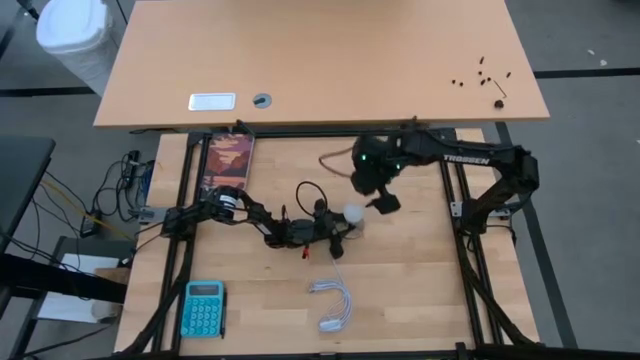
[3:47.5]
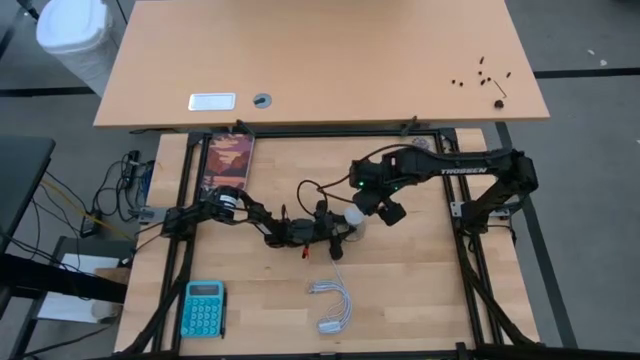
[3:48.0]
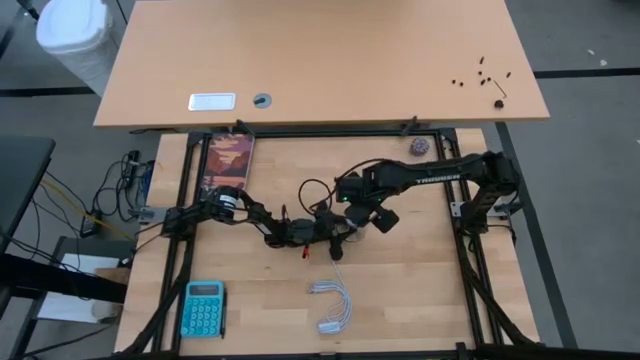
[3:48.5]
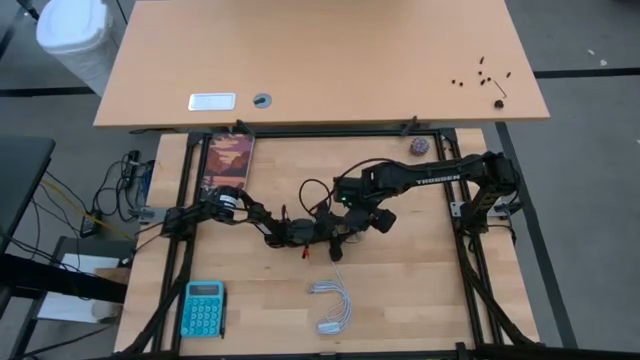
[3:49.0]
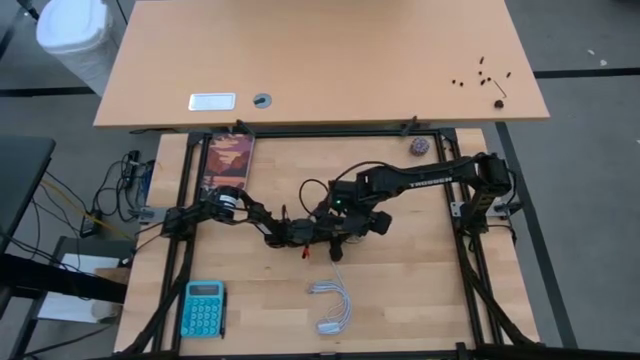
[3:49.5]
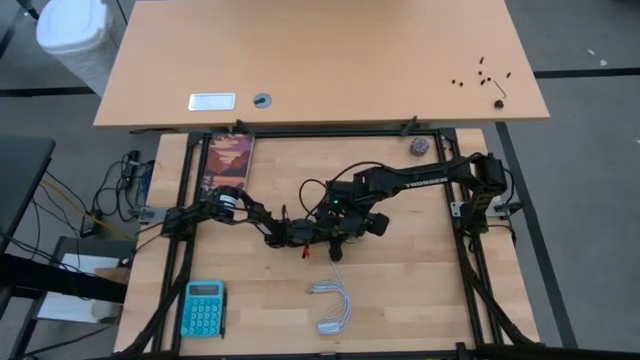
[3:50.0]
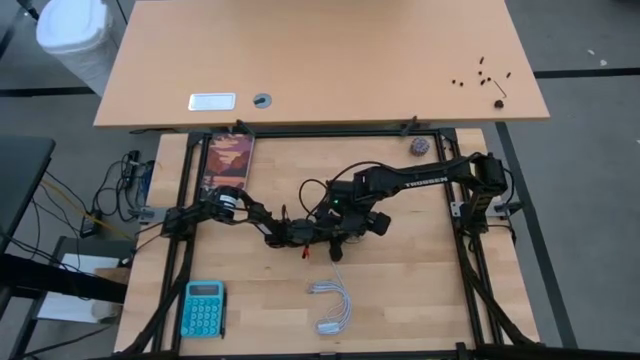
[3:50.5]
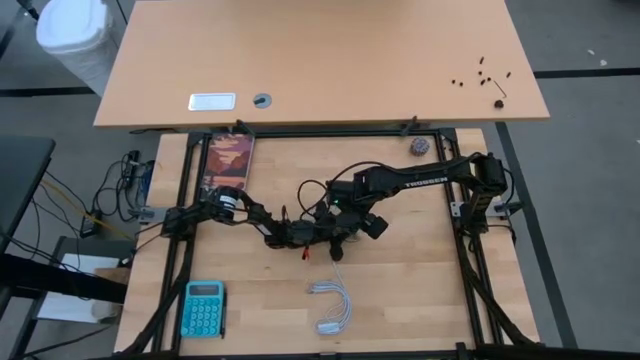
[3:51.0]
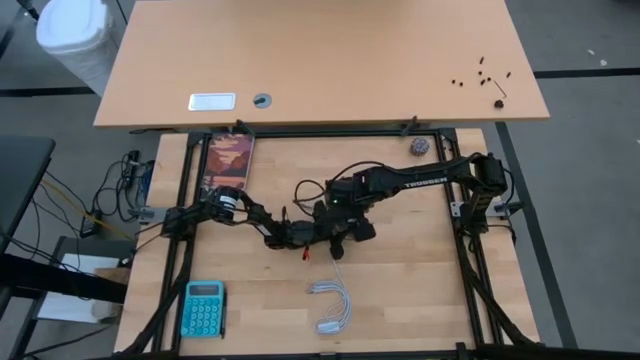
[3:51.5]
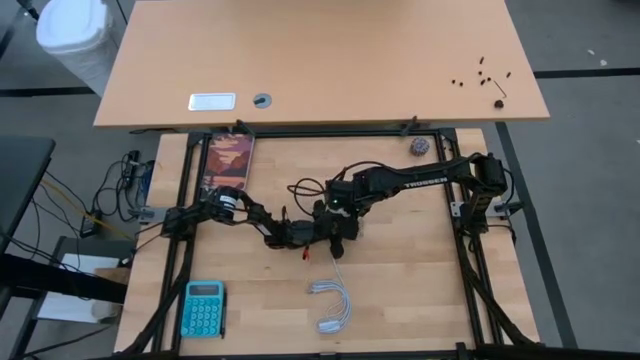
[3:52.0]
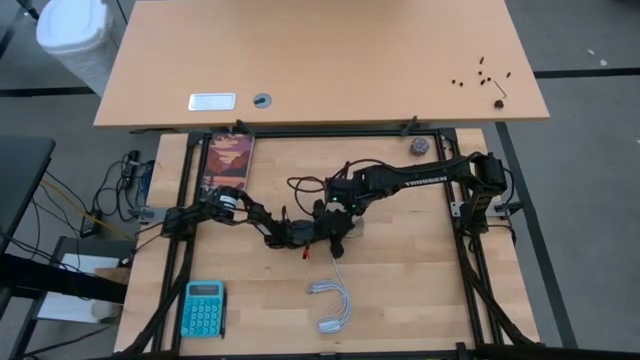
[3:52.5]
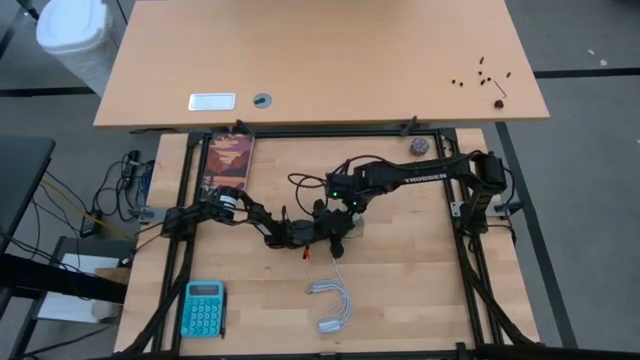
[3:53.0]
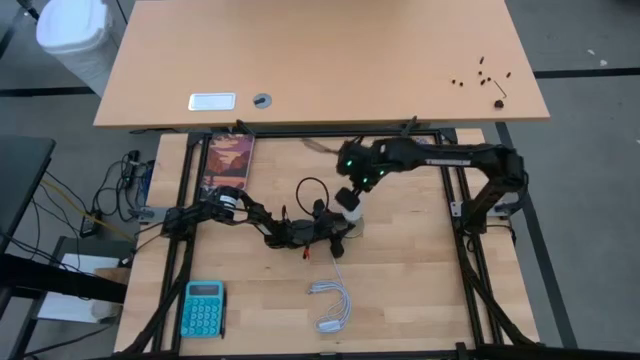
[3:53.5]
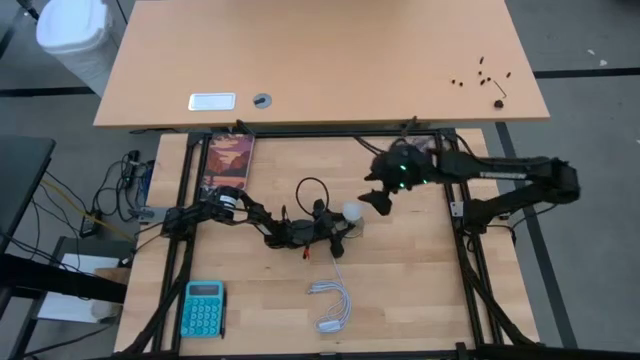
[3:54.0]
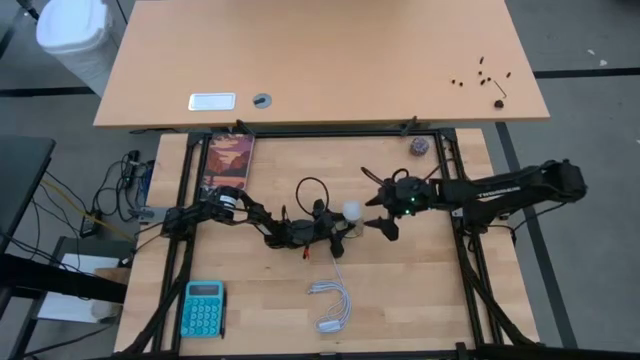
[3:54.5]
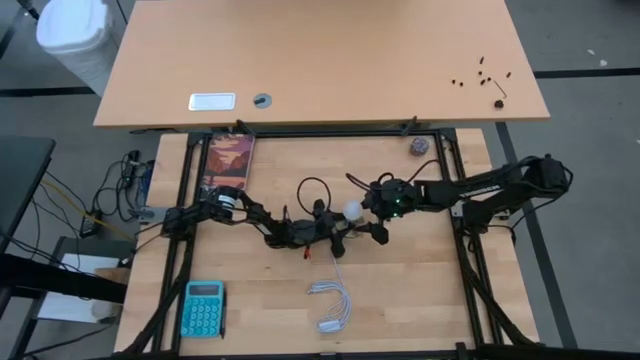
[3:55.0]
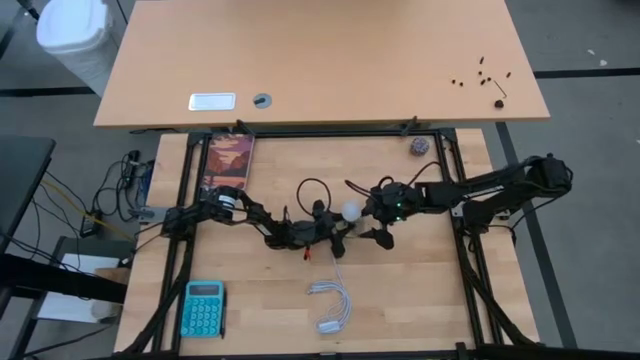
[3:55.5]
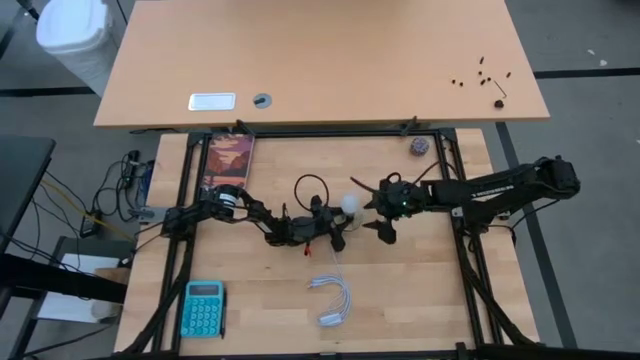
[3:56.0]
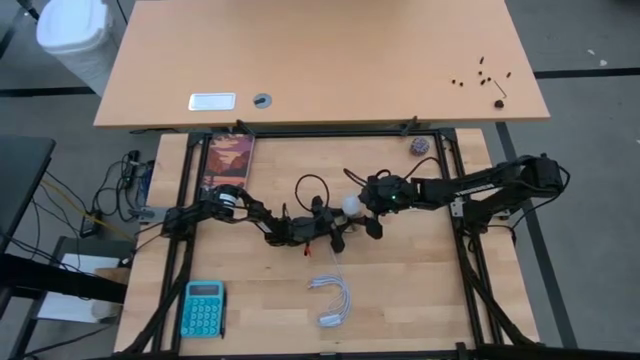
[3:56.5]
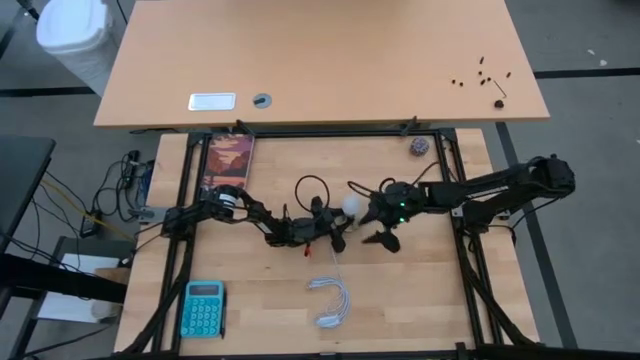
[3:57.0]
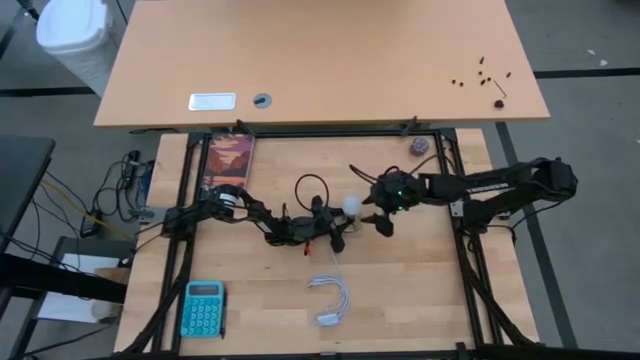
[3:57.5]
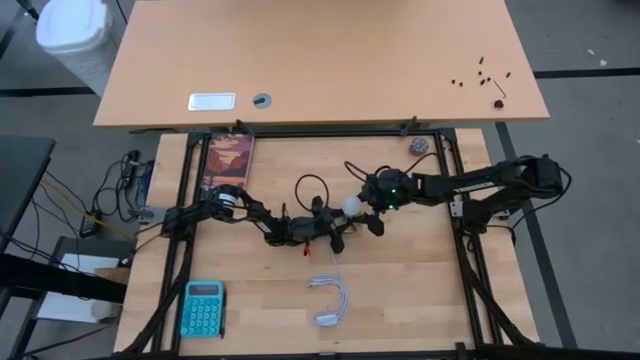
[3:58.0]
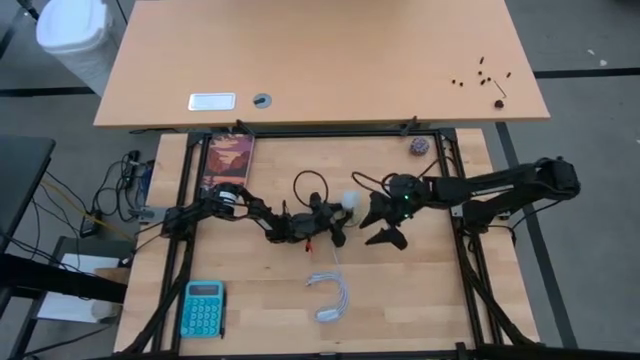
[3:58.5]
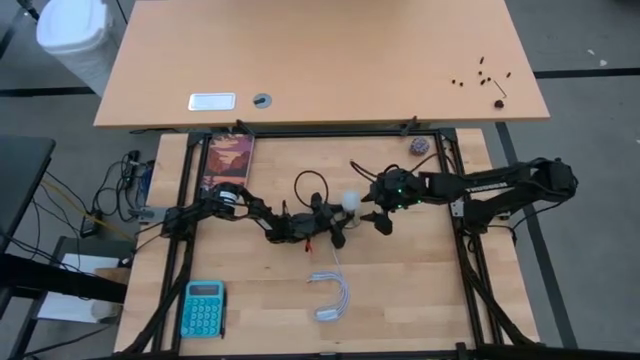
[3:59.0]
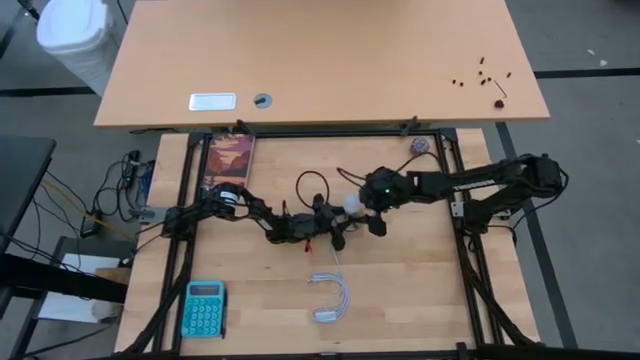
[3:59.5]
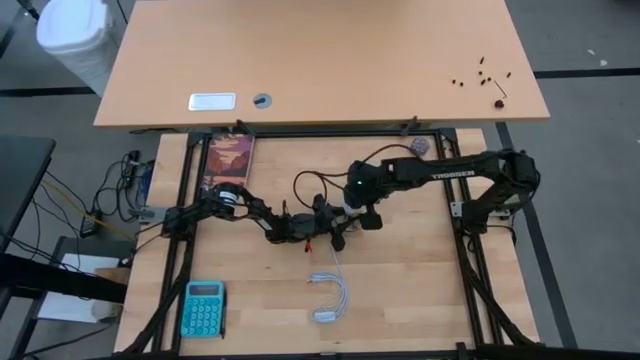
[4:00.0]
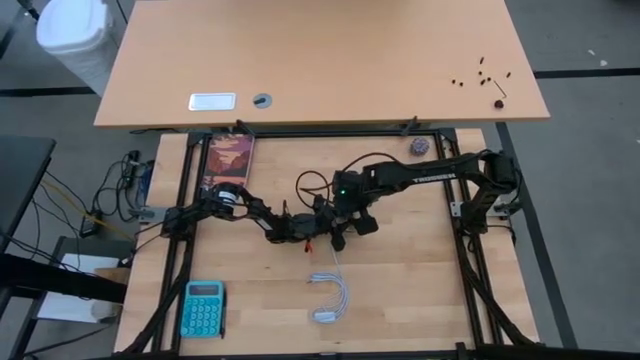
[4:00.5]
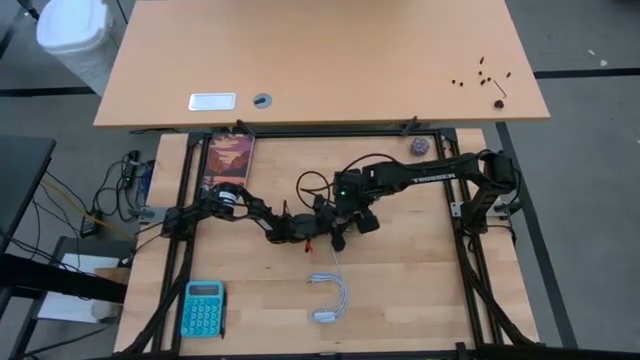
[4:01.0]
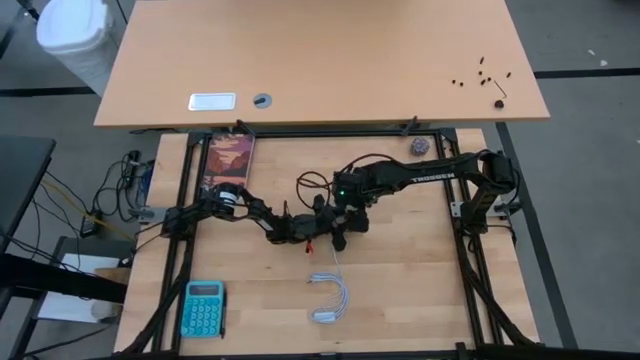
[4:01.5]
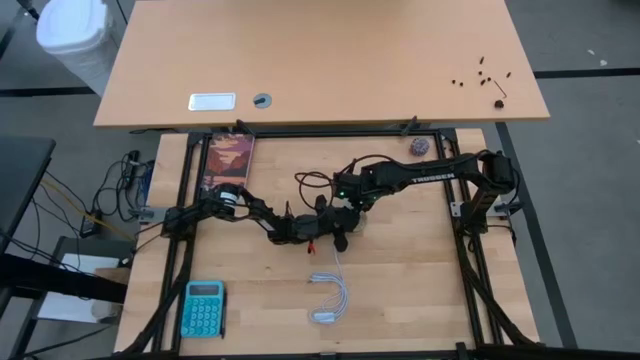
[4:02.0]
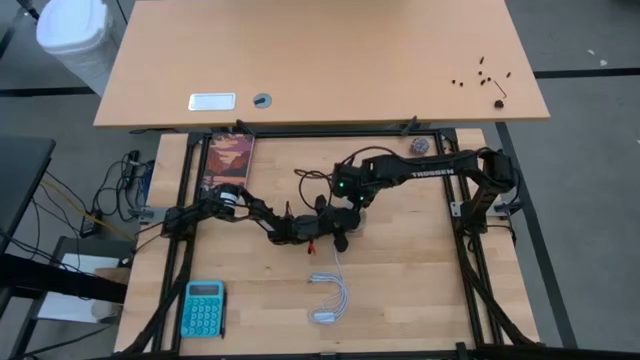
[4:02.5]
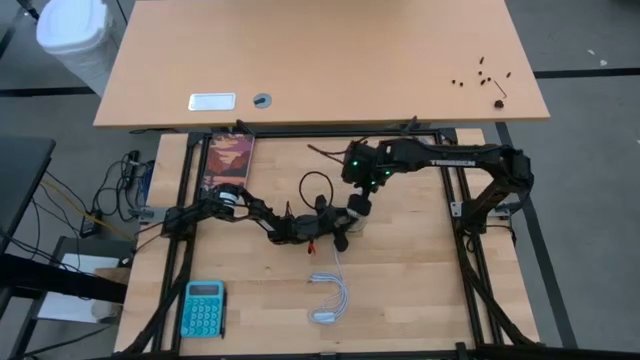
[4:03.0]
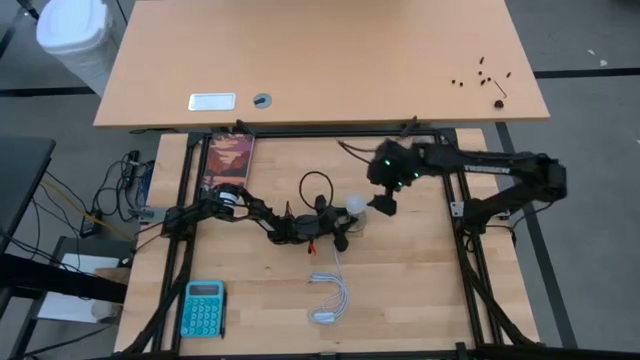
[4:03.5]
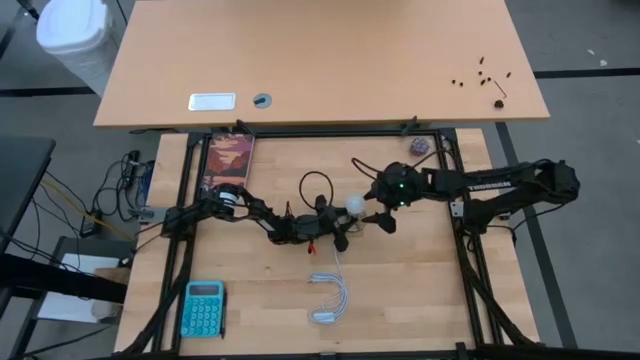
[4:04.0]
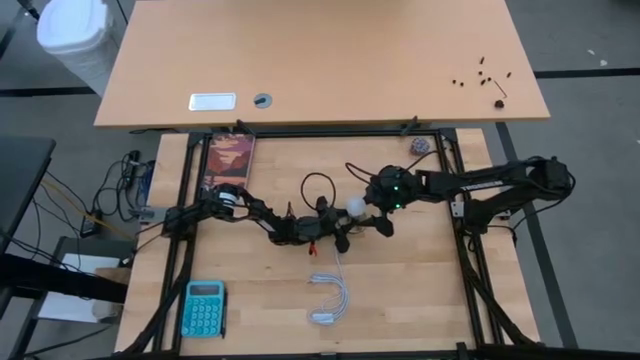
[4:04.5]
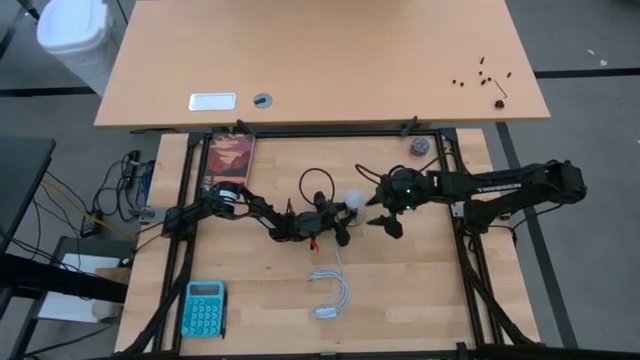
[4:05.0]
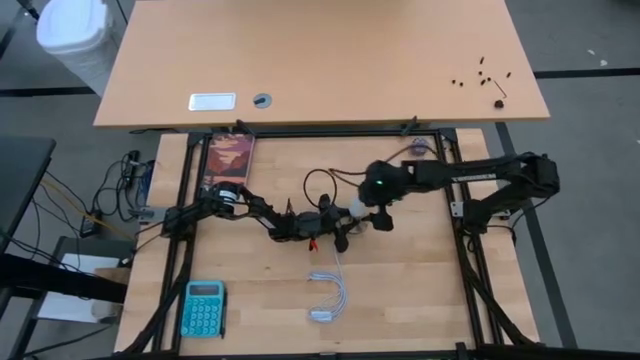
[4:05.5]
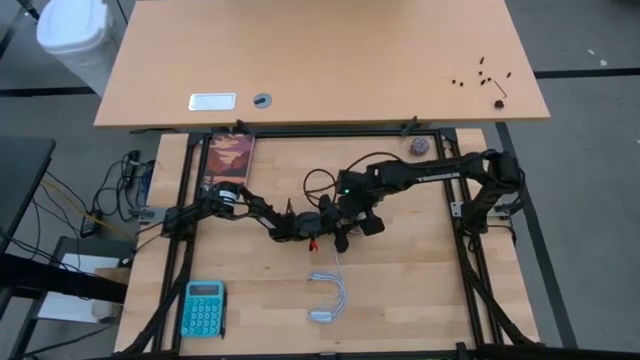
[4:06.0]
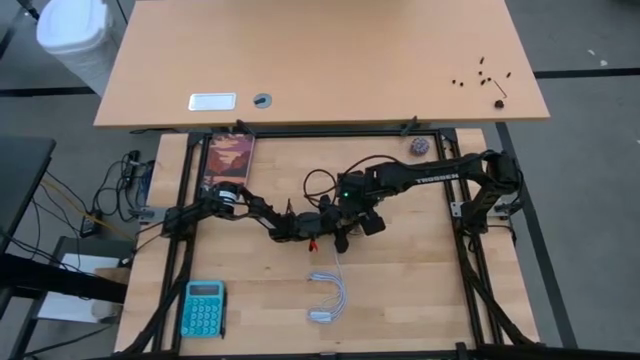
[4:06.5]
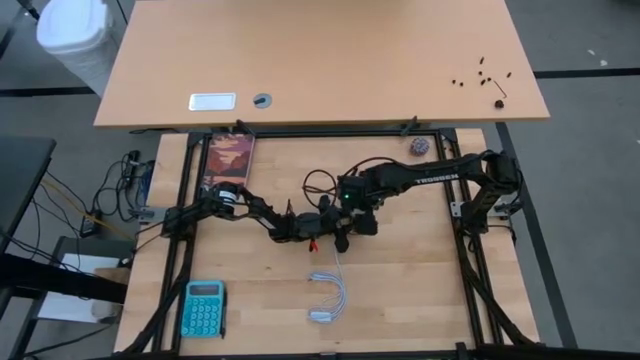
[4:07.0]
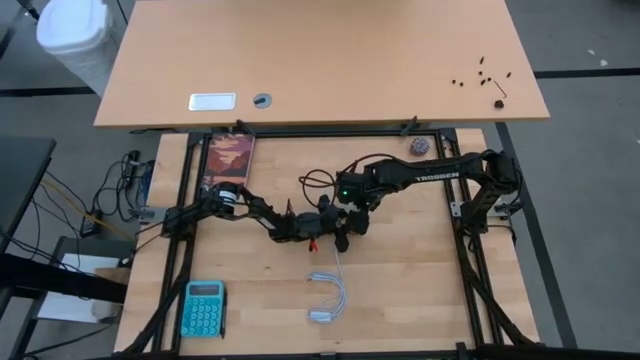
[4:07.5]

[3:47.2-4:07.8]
Task: Screw lightbulb
Insert the lightbulb into the desk lamp
